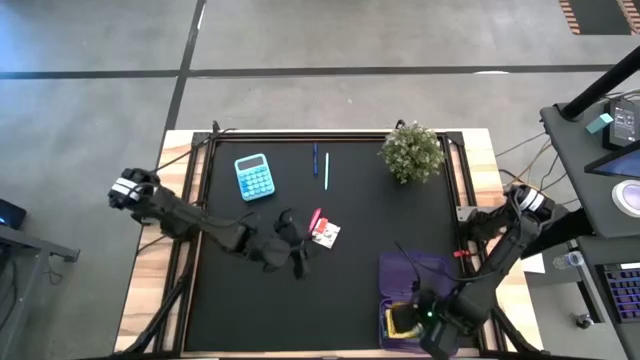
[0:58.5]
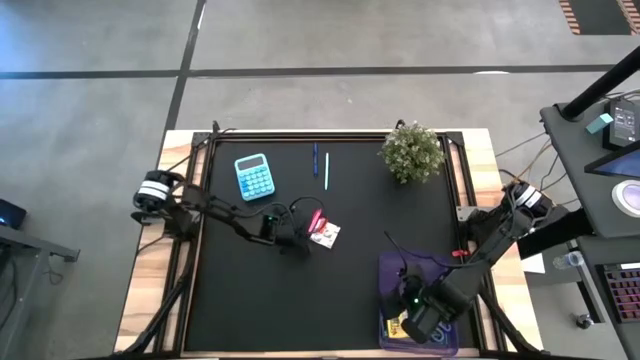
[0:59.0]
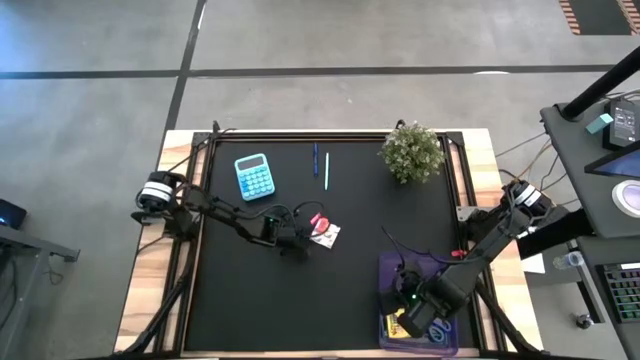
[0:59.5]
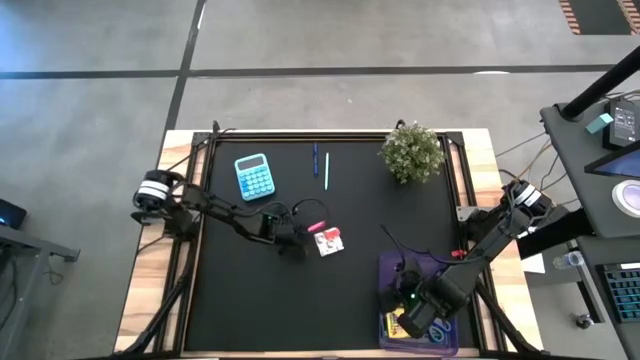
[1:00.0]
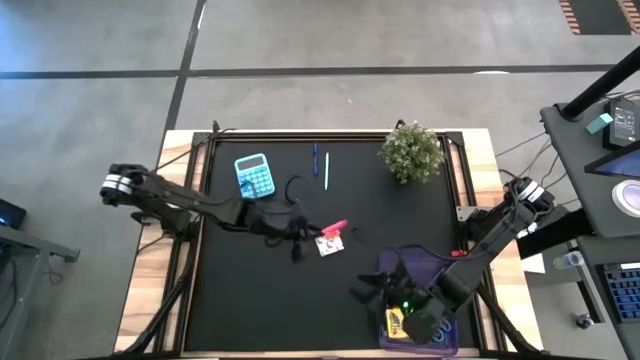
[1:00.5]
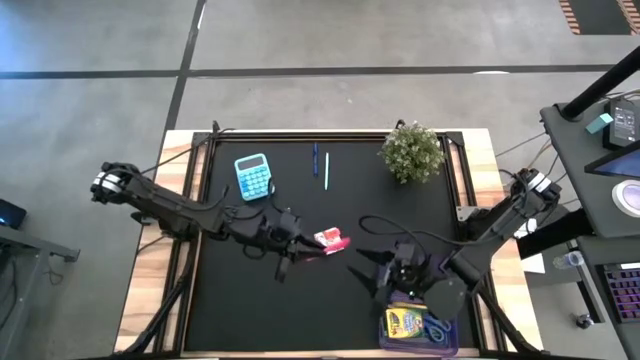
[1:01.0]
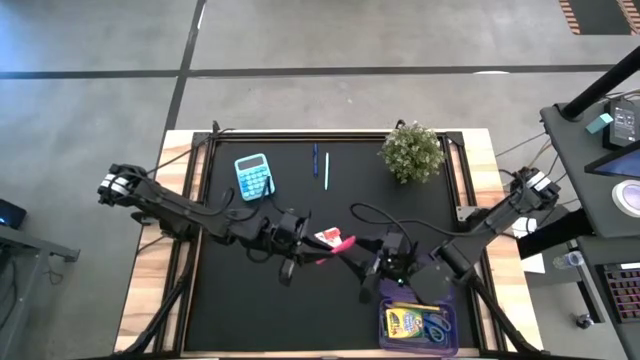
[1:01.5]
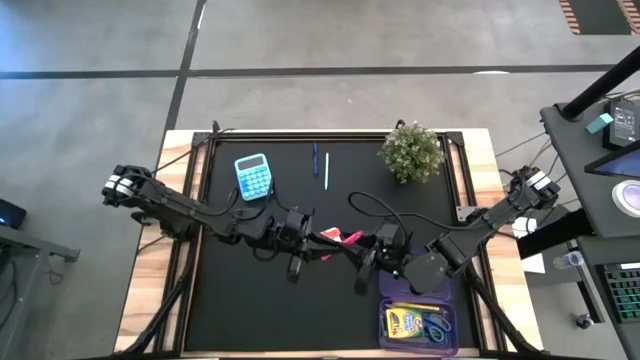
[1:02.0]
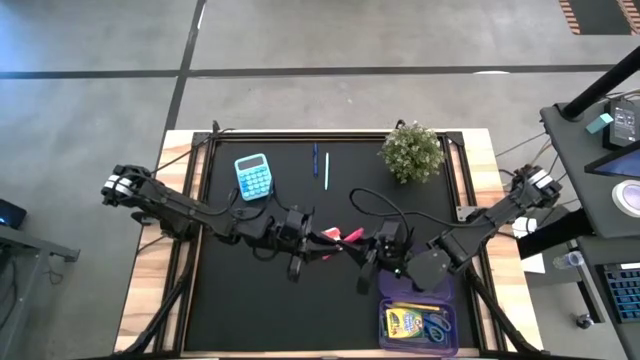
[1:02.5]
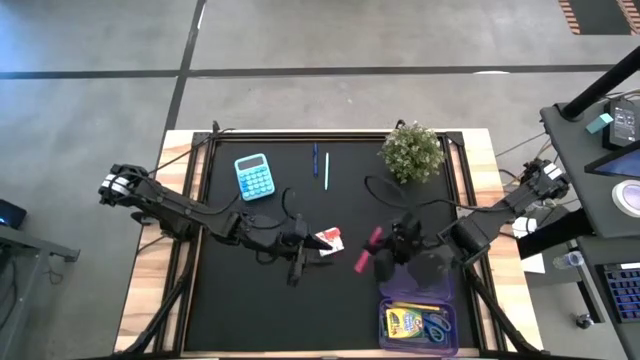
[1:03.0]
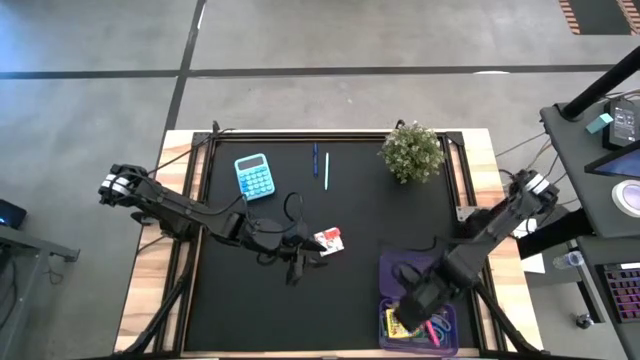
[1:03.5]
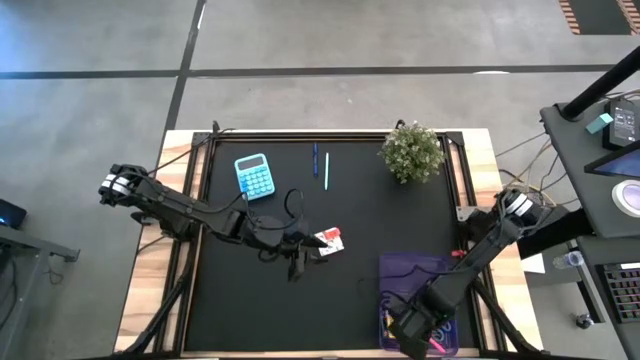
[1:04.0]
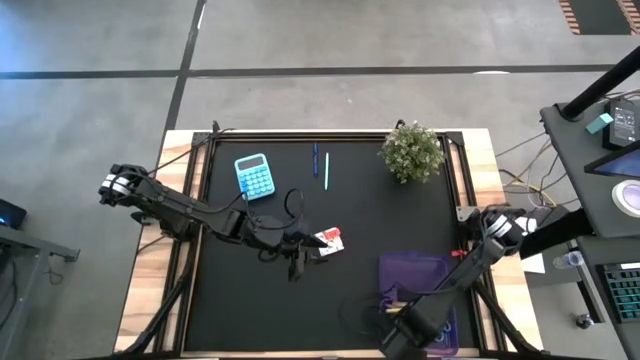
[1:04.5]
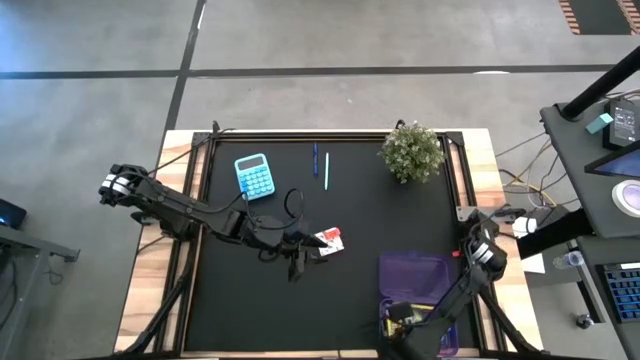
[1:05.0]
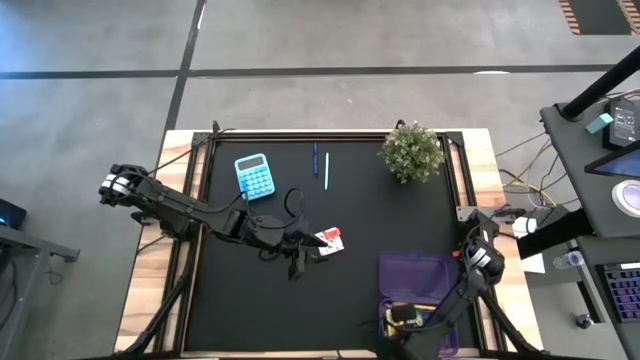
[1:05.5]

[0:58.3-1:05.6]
Task: Pack school essentials
Put the pink pen into the purple supply box

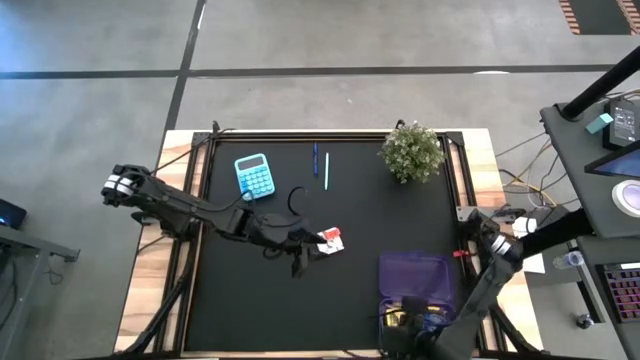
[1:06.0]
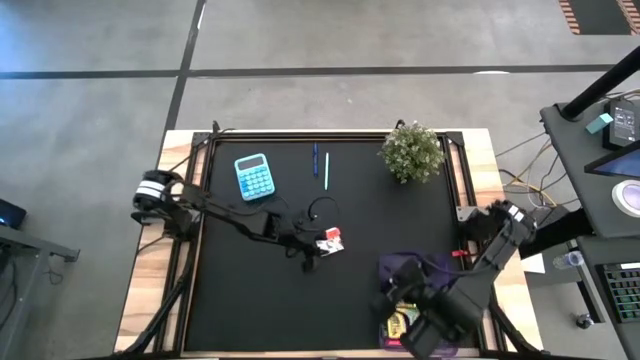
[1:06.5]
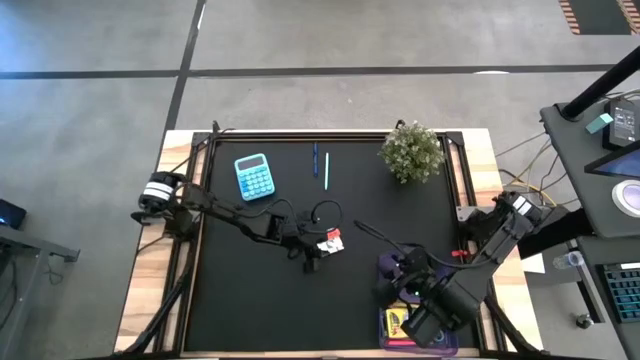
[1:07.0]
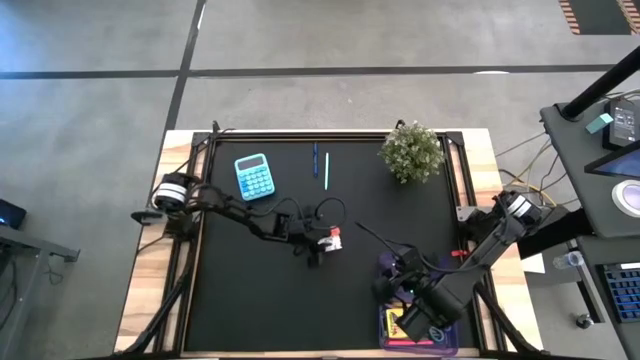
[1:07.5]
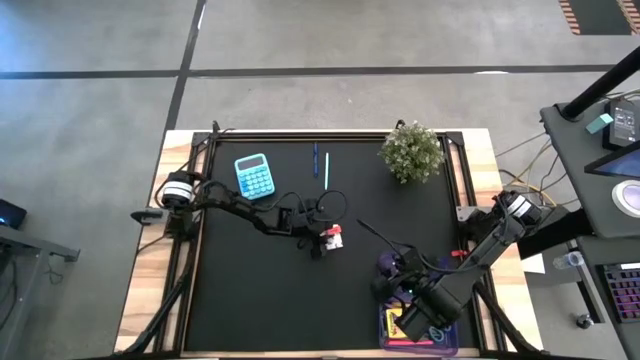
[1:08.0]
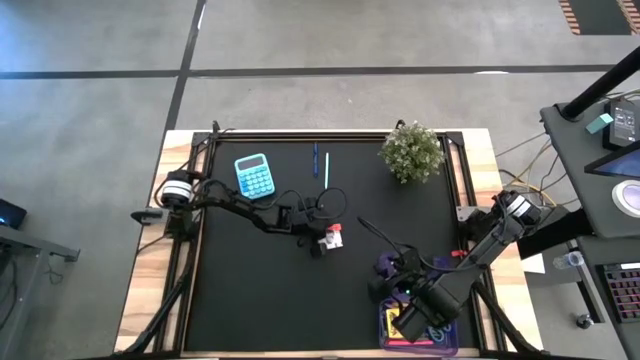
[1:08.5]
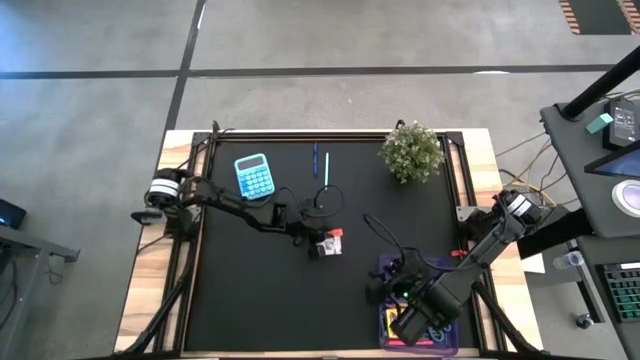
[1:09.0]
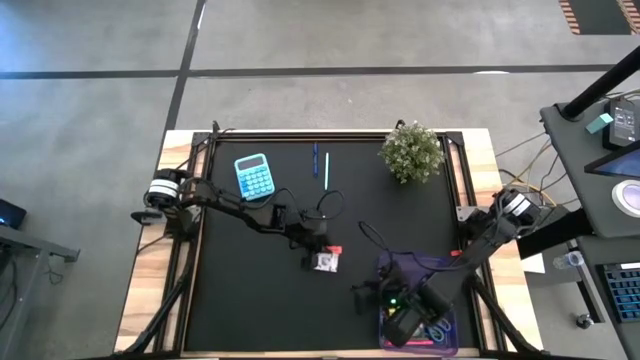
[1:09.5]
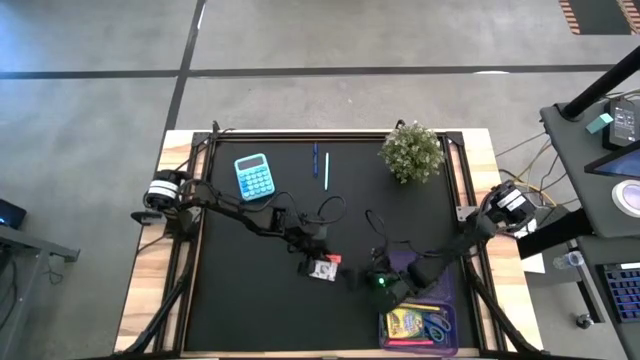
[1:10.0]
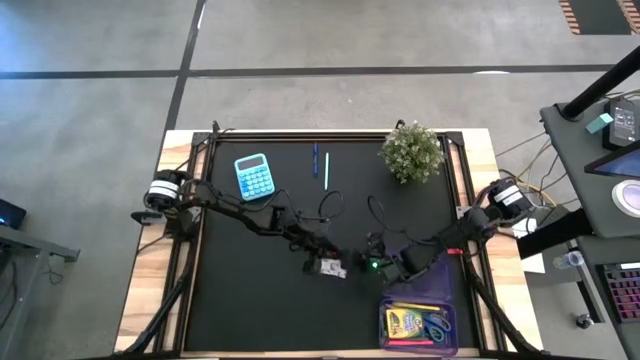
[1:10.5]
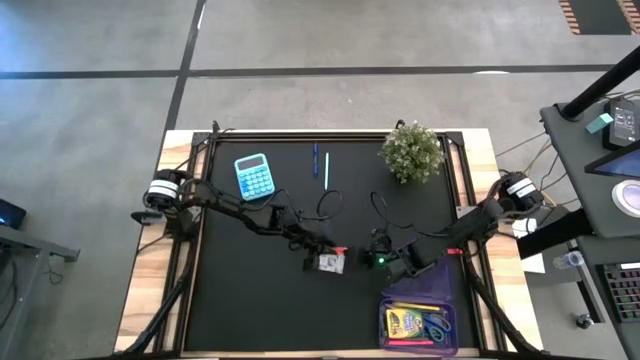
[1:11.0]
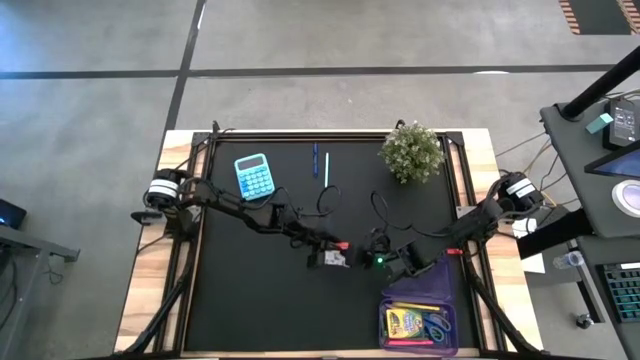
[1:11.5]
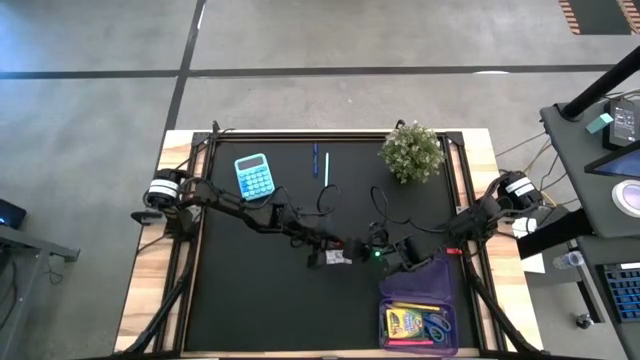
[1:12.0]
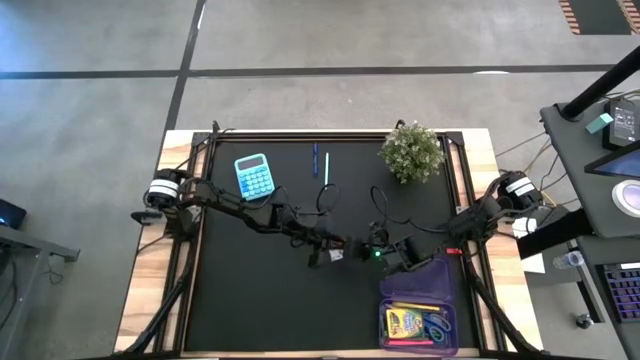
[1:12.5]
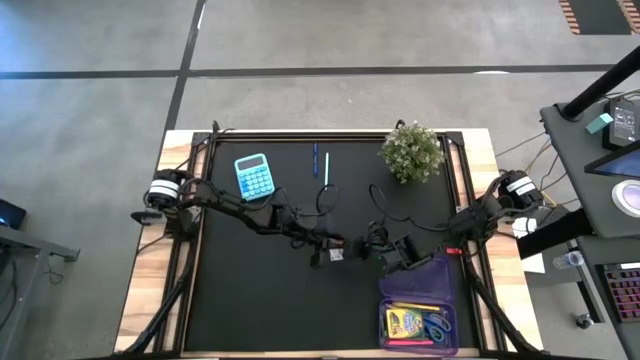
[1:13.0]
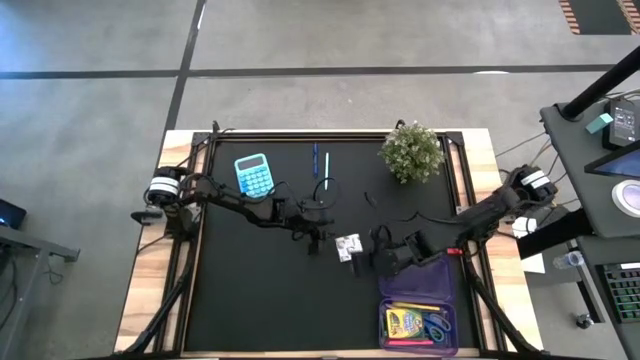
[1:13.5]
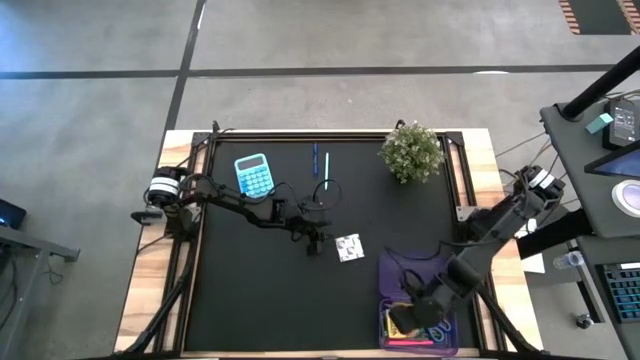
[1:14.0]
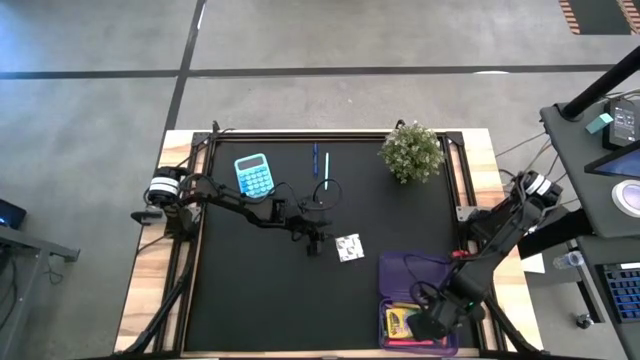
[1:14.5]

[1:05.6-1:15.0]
Put the orange eraser into the purple supply box

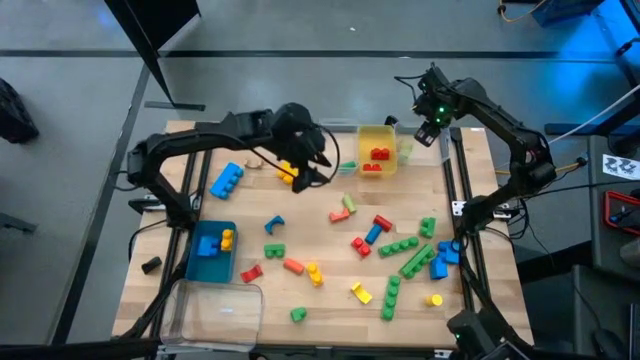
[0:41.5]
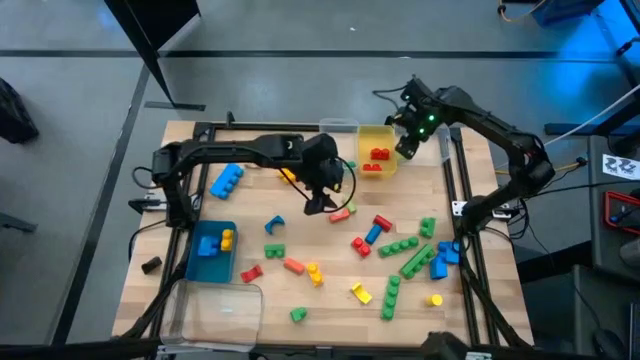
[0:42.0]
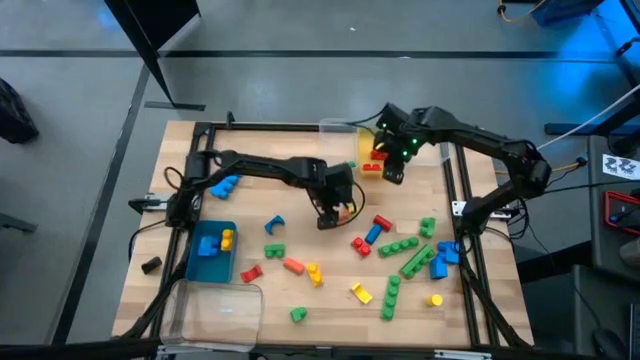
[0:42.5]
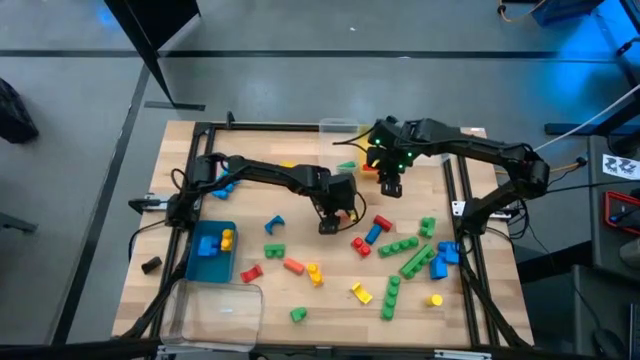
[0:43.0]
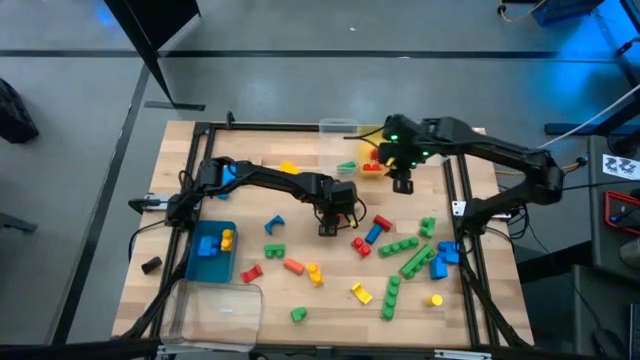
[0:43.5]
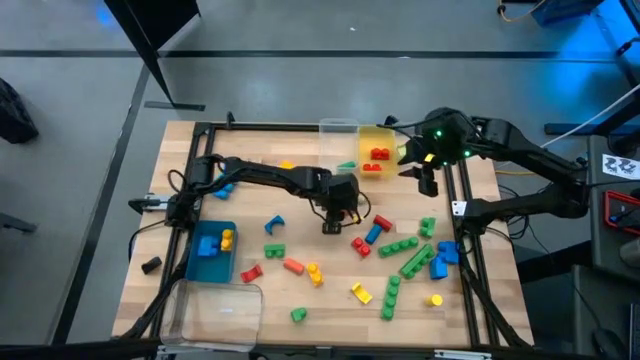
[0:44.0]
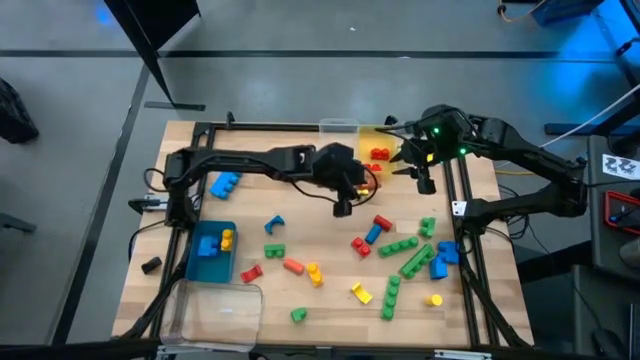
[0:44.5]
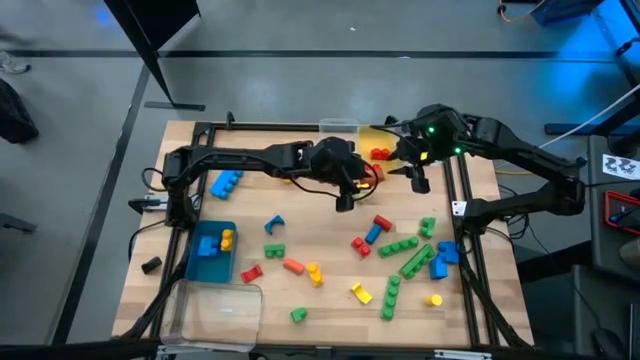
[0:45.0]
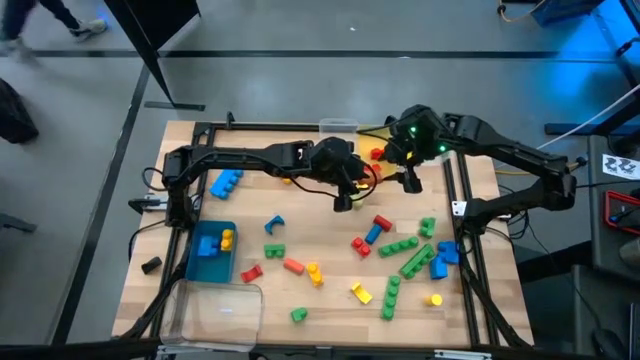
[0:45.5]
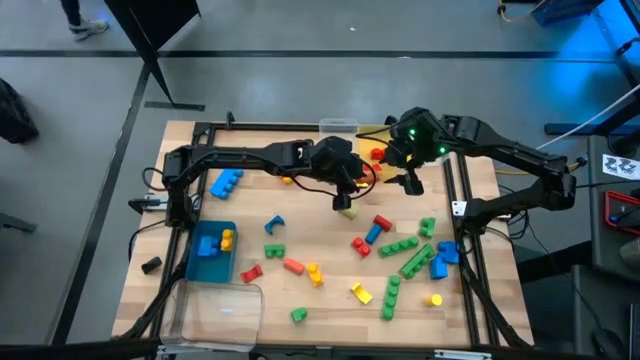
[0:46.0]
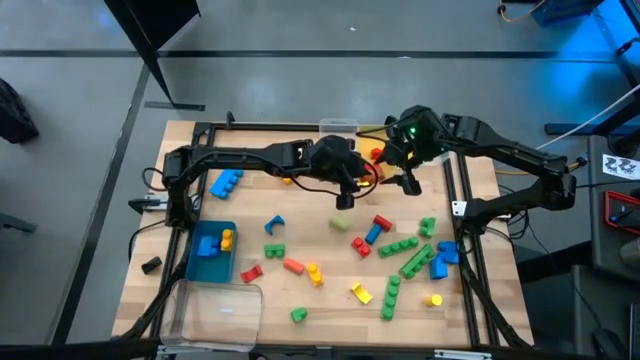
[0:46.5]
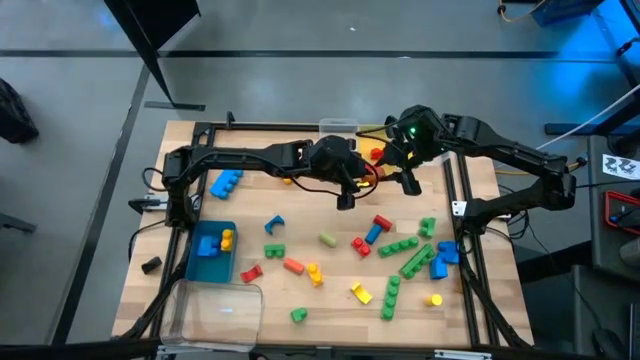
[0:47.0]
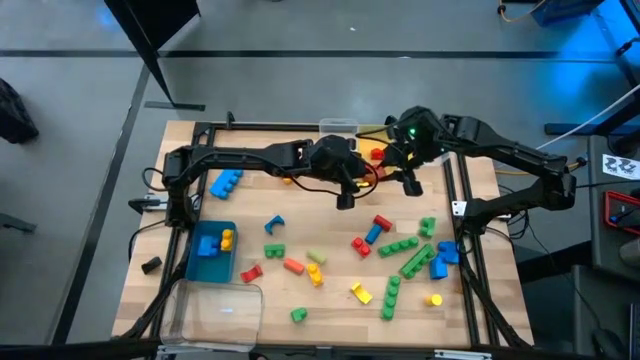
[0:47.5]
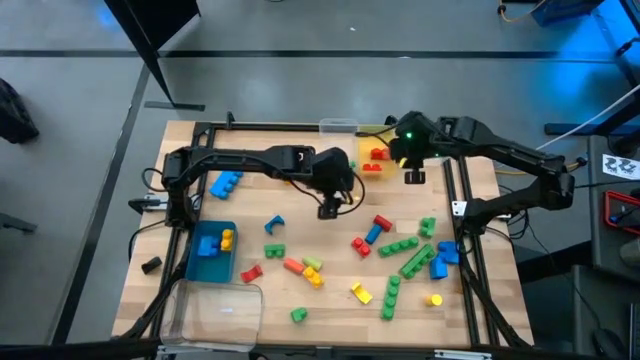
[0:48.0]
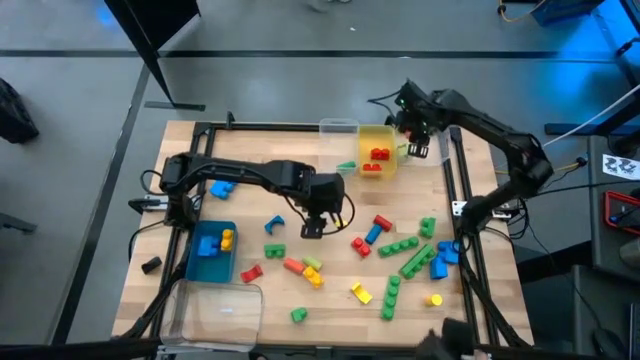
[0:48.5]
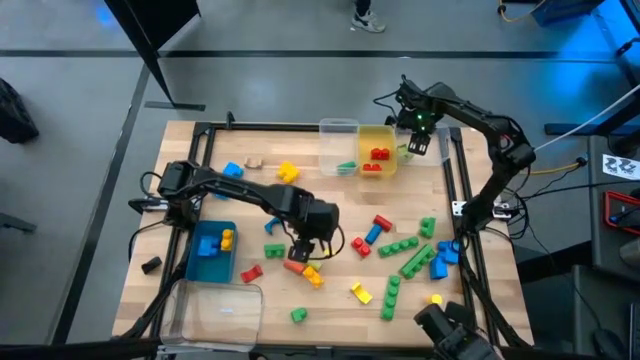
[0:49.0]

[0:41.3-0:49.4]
Task: Sort blocks by size
Put the orange arch block into the top right transparent bin
